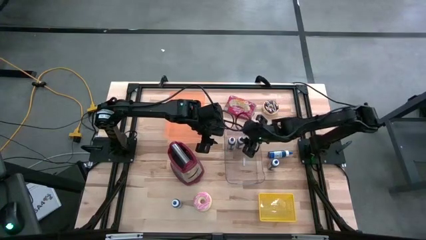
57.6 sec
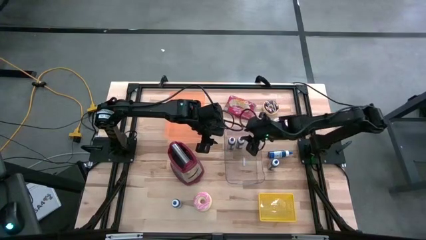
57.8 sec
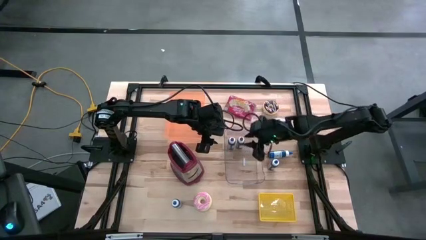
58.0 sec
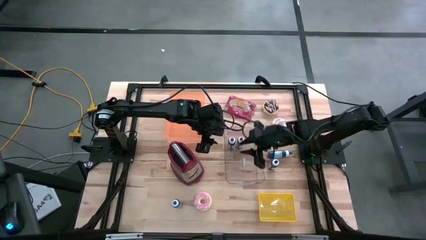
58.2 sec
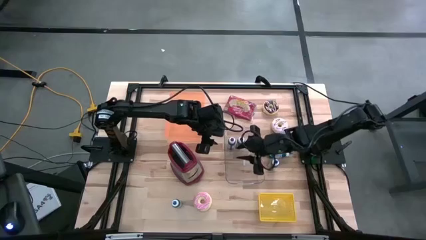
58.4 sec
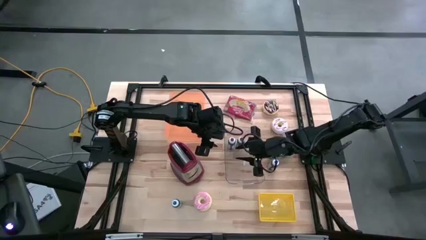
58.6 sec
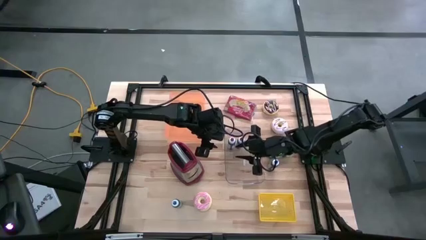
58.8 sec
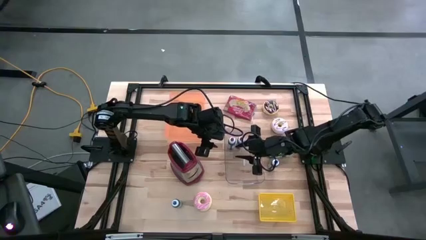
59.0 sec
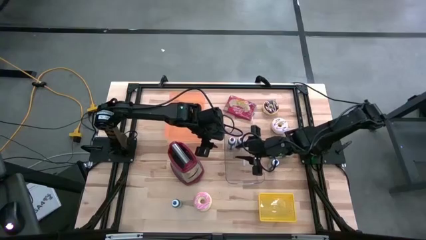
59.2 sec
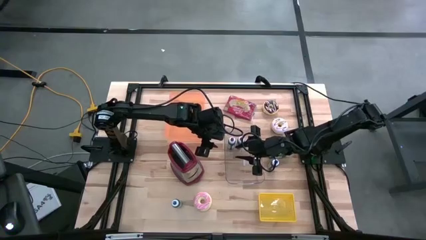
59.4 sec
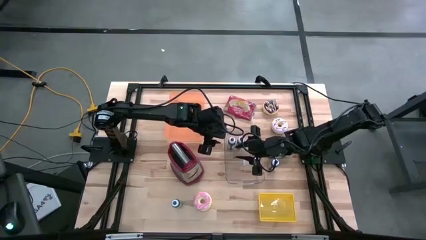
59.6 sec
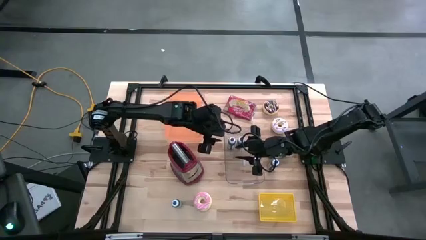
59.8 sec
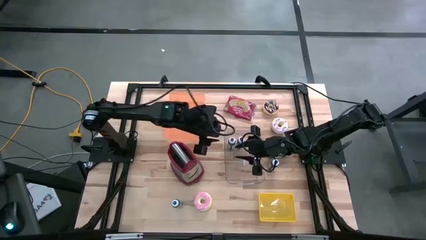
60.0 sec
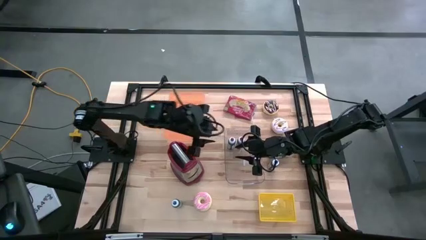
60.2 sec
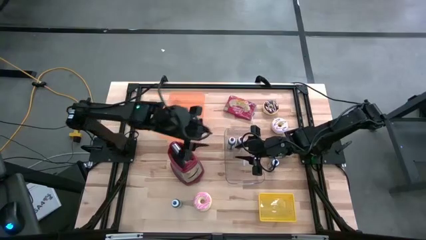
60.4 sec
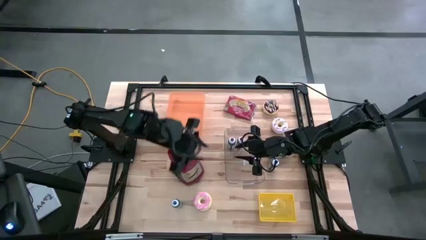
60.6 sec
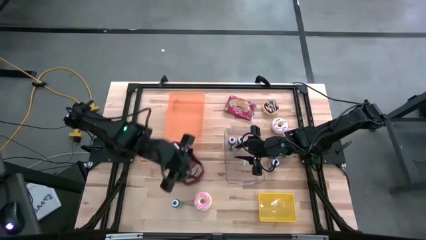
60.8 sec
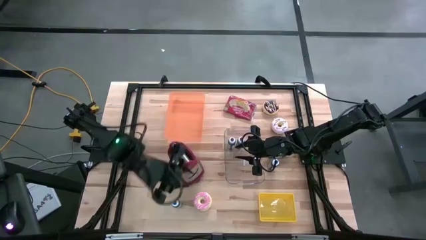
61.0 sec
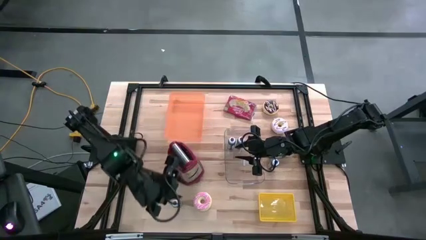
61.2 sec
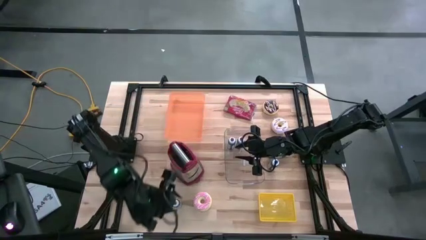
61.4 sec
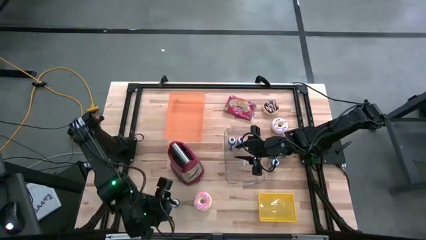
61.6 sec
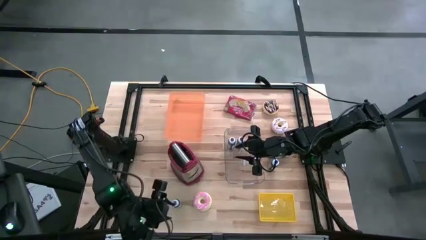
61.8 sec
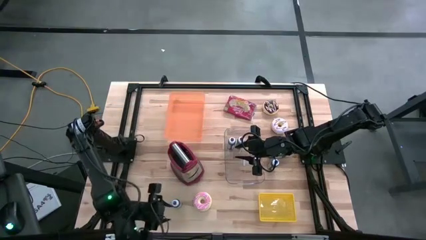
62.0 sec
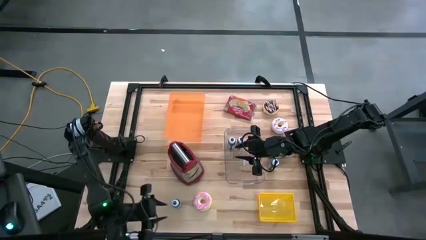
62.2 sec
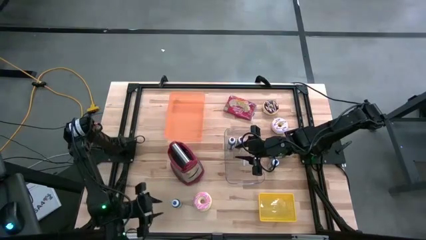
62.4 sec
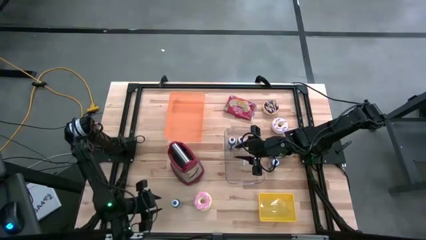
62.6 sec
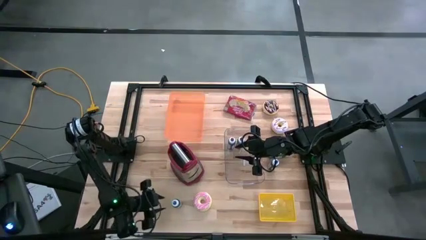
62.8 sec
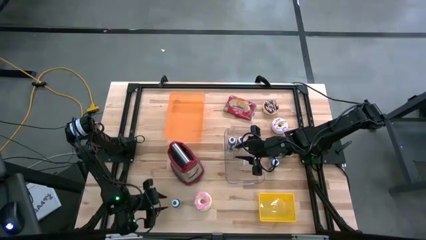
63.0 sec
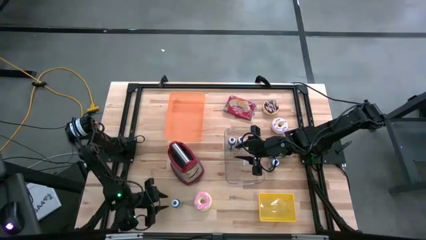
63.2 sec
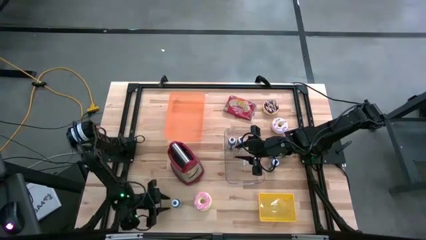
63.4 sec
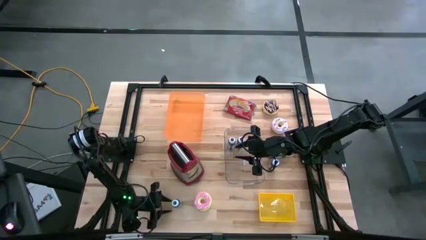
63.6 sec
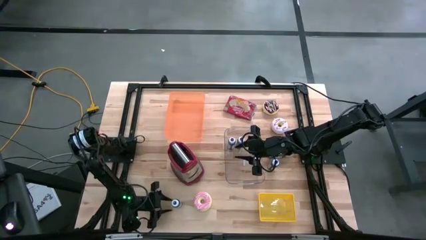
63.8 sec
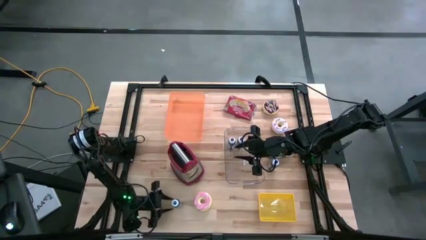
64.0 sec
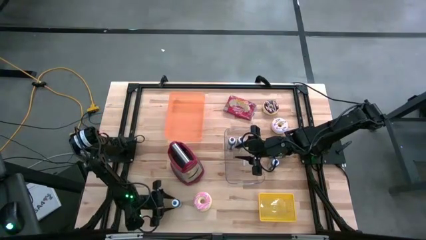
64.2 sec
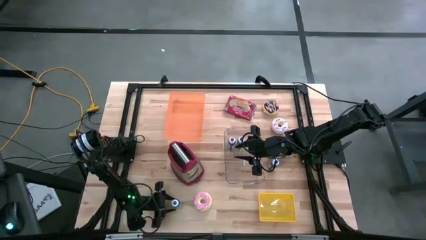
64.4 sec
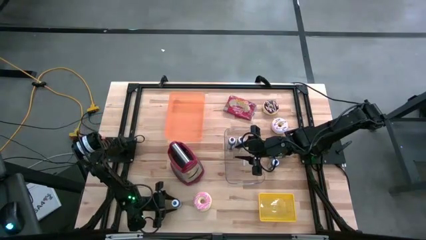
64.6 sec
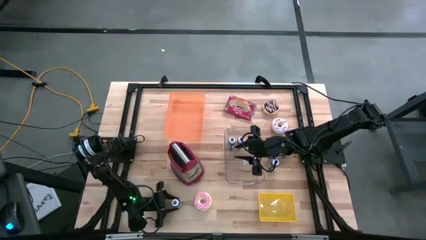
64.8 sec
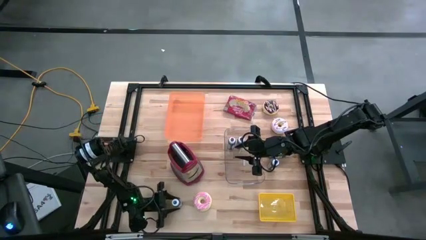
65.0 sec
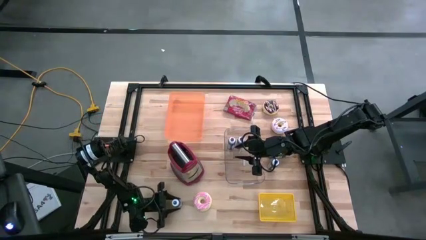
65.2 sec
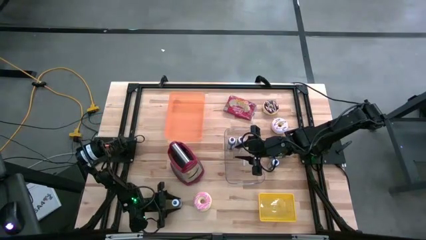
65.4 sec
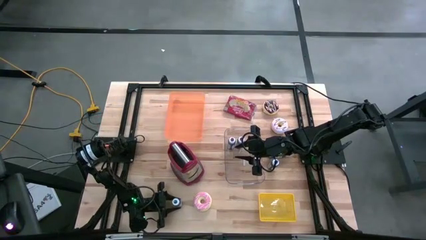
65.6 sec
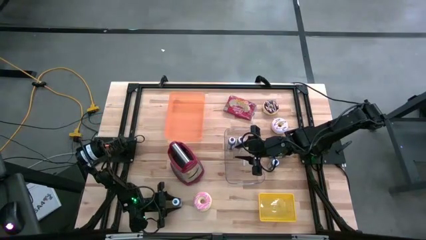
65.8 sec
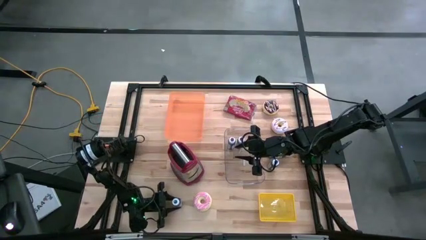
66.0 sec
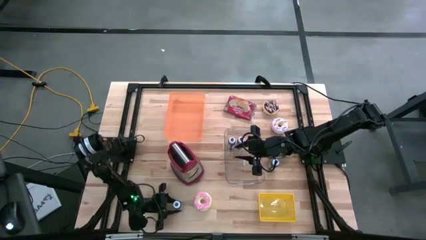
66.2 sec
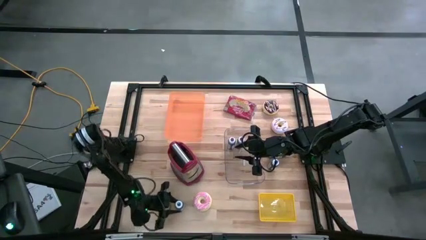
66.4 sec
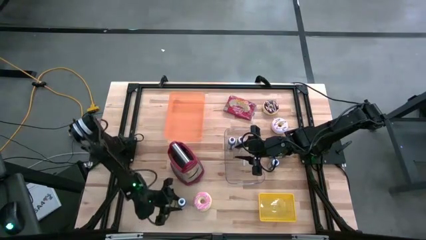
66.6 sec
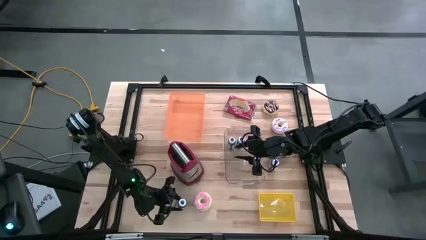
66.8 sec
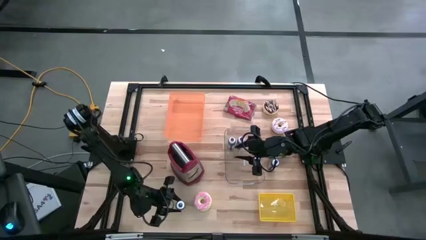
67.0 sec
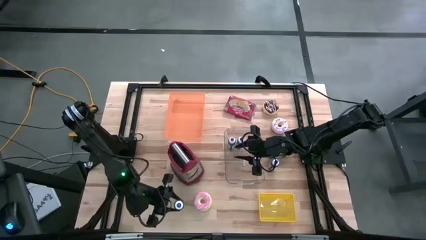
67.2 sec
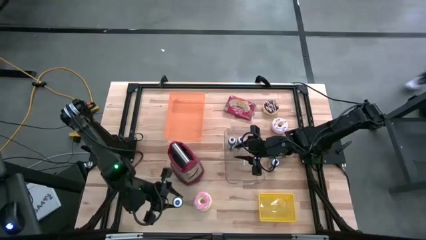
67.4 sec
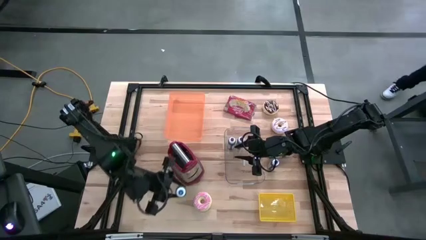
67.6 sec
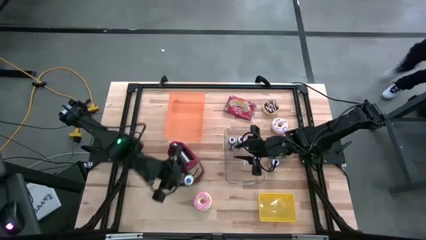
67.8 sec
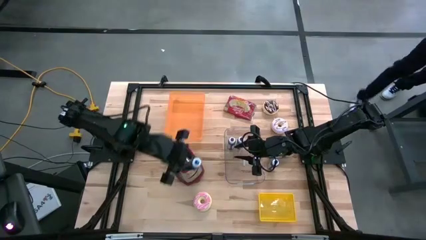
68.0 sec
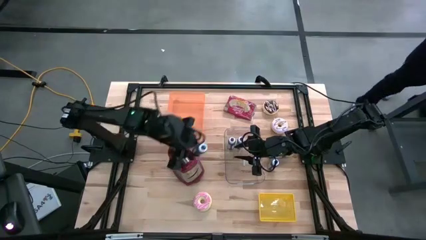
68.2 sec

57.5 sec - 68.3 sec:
Task: Pick & Place Food Item
Put the bottom left blue food coloring bottle into the transparent bin
